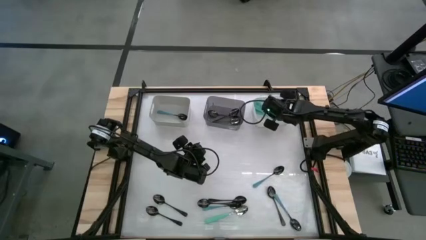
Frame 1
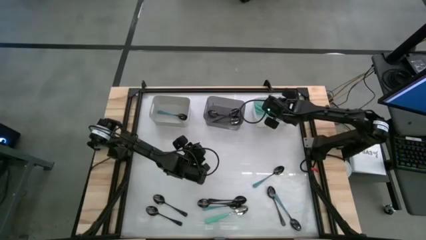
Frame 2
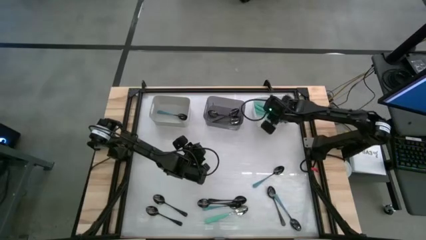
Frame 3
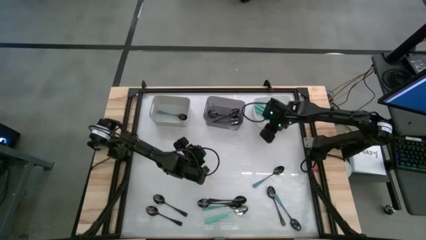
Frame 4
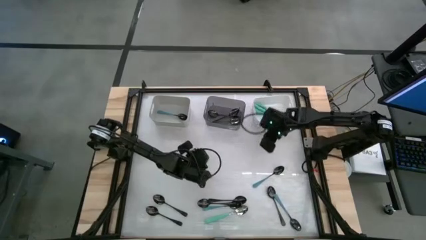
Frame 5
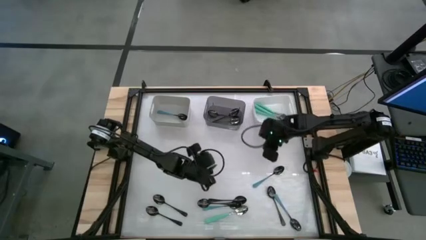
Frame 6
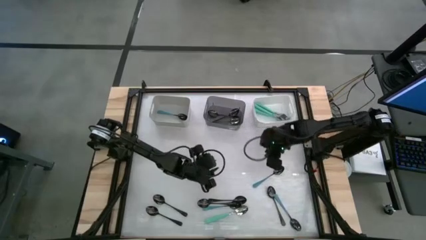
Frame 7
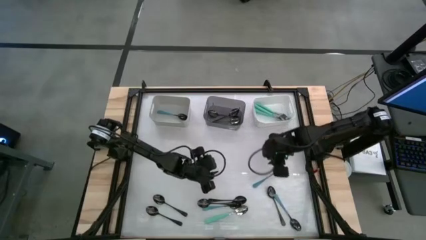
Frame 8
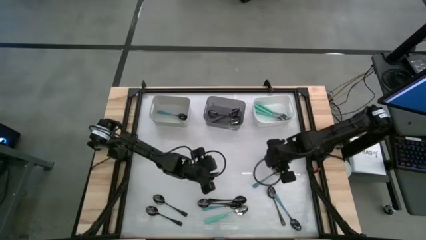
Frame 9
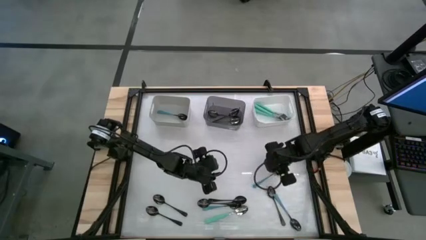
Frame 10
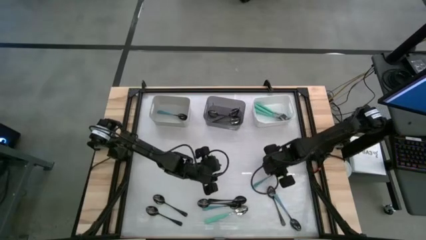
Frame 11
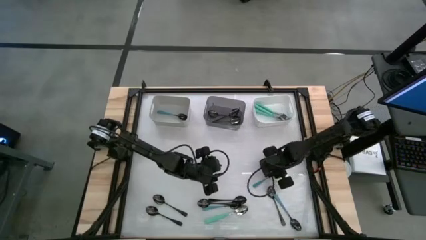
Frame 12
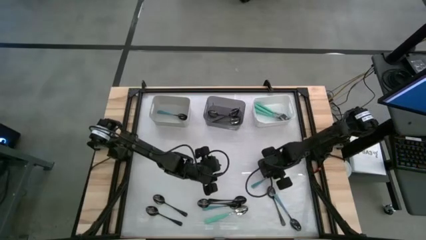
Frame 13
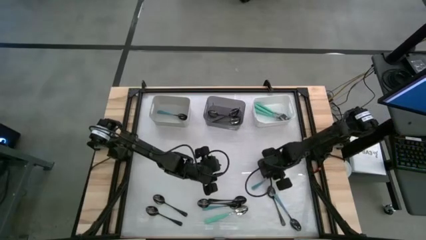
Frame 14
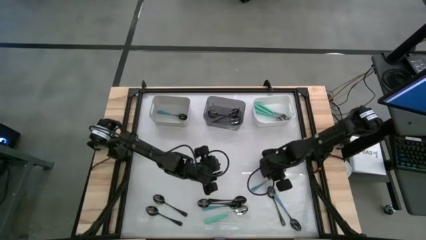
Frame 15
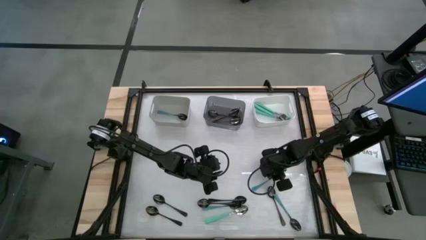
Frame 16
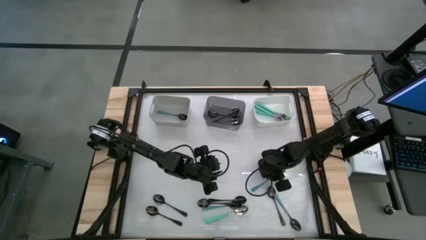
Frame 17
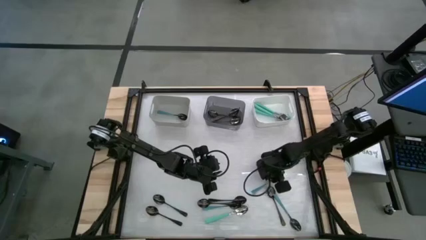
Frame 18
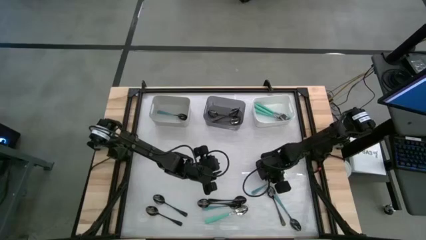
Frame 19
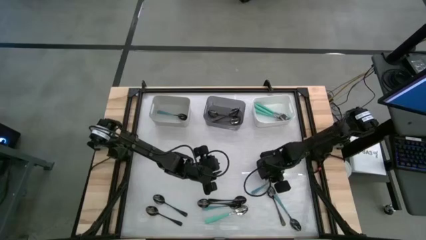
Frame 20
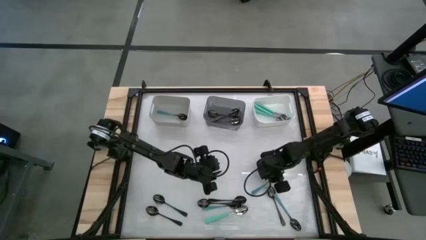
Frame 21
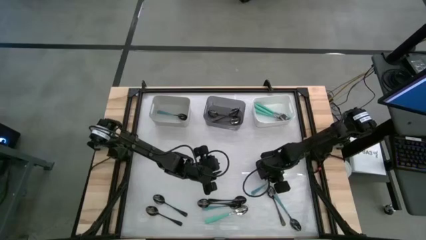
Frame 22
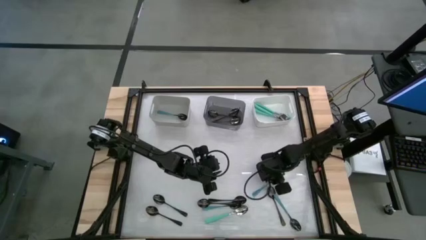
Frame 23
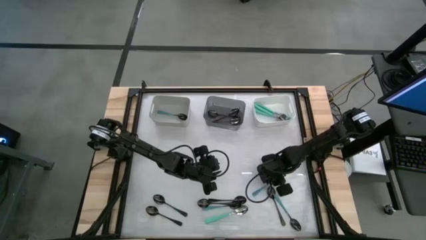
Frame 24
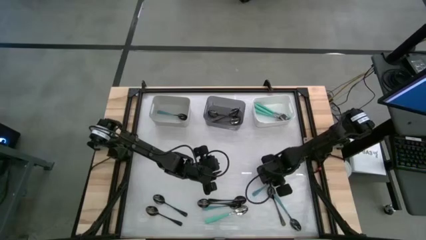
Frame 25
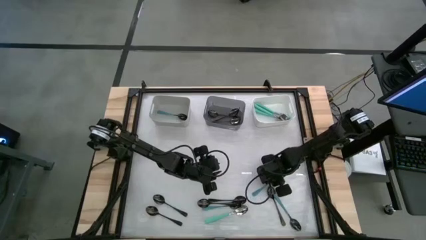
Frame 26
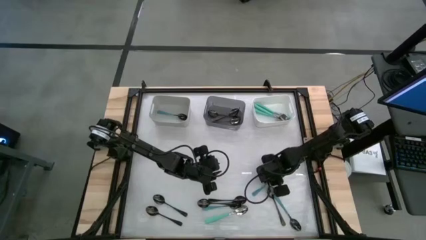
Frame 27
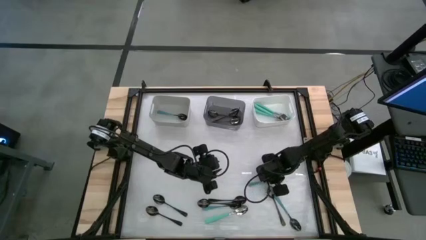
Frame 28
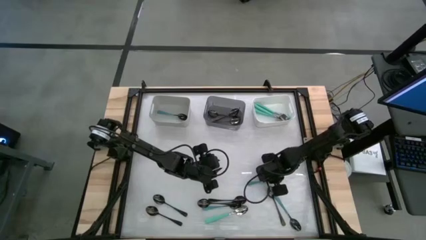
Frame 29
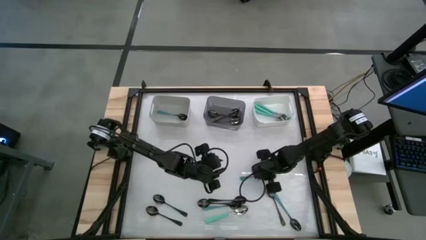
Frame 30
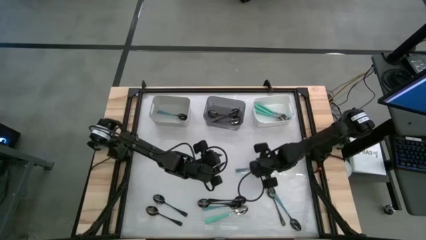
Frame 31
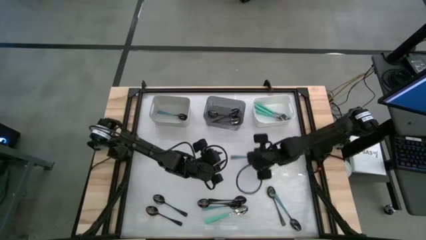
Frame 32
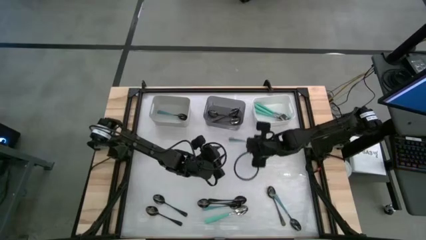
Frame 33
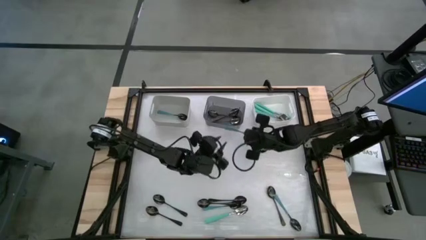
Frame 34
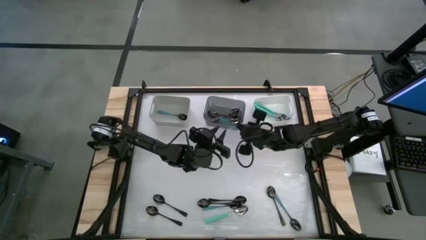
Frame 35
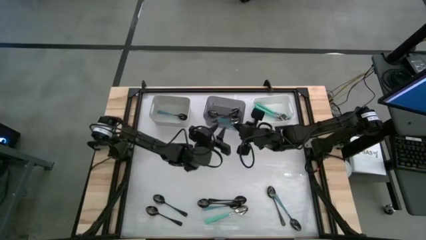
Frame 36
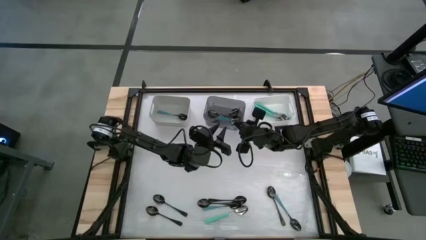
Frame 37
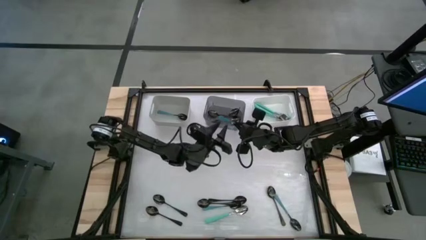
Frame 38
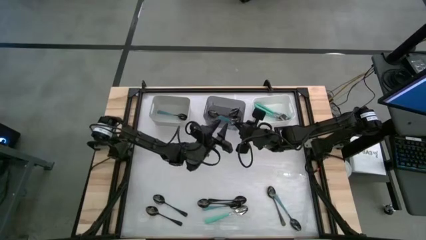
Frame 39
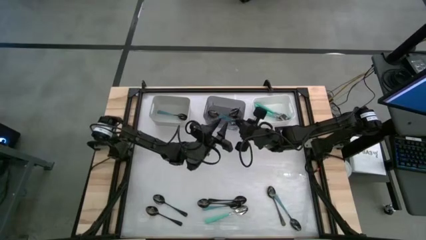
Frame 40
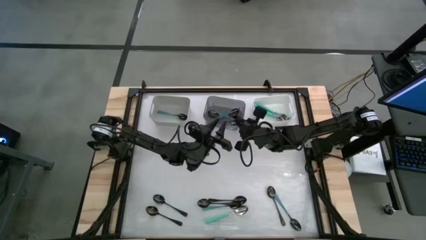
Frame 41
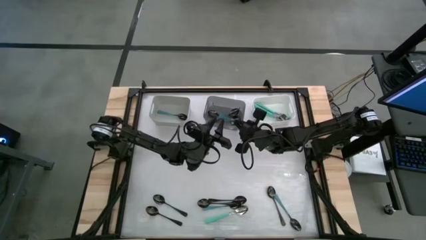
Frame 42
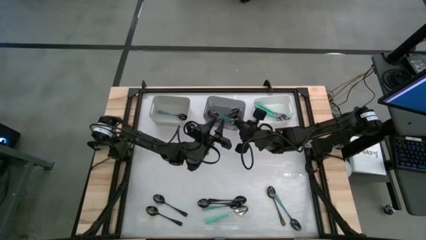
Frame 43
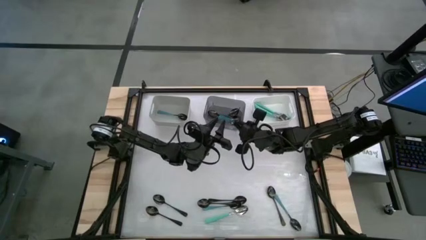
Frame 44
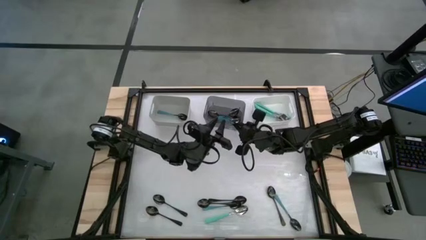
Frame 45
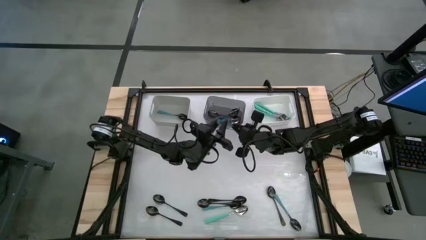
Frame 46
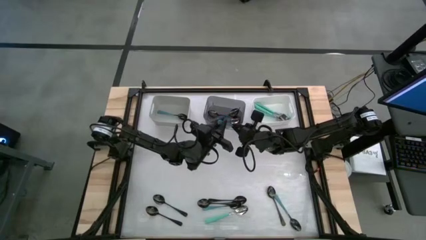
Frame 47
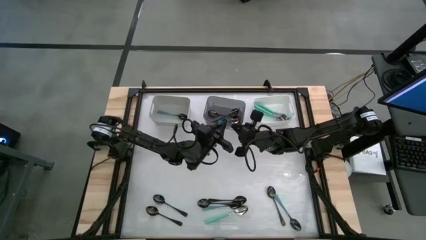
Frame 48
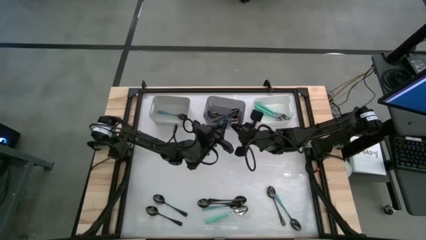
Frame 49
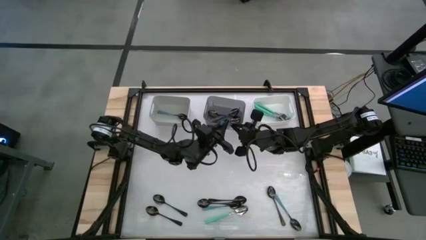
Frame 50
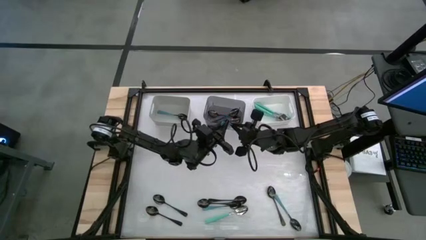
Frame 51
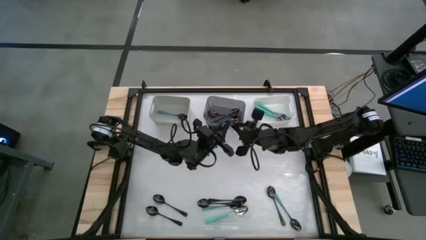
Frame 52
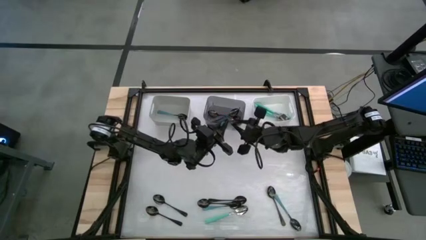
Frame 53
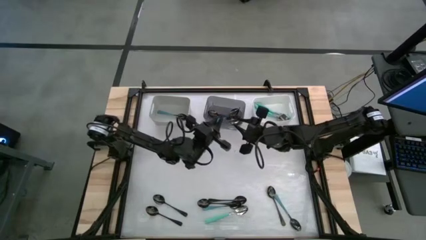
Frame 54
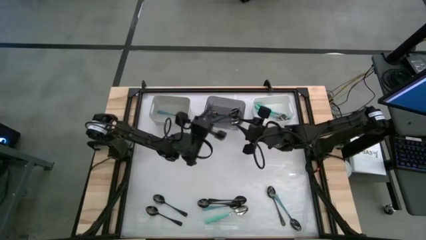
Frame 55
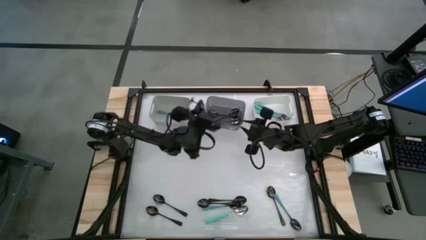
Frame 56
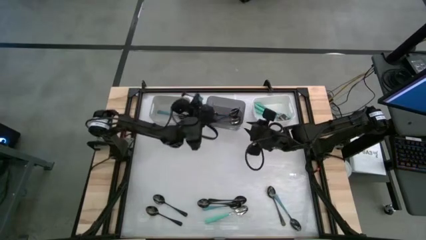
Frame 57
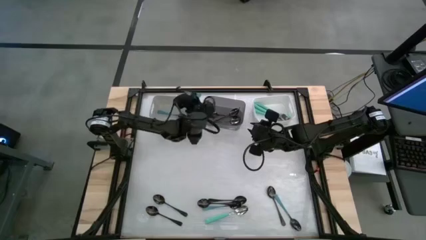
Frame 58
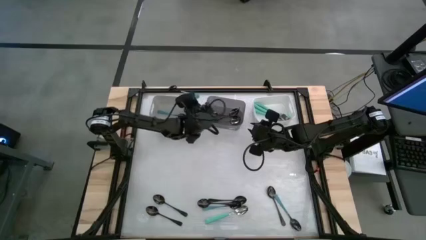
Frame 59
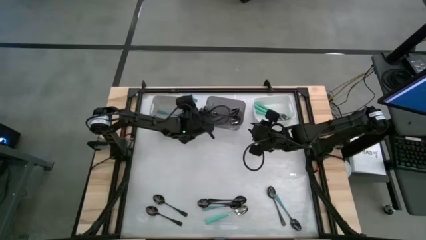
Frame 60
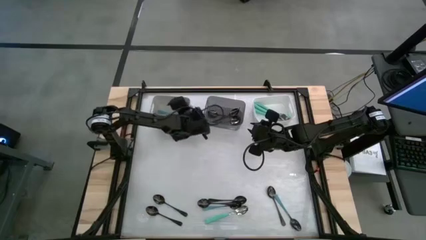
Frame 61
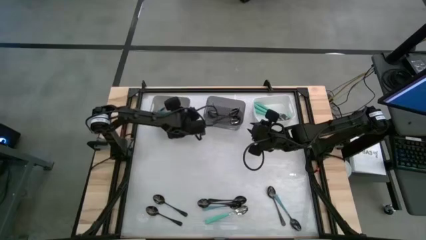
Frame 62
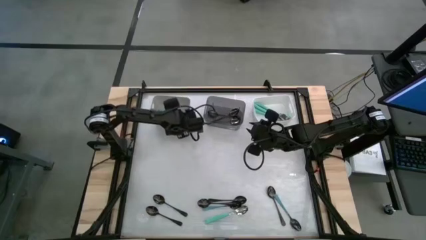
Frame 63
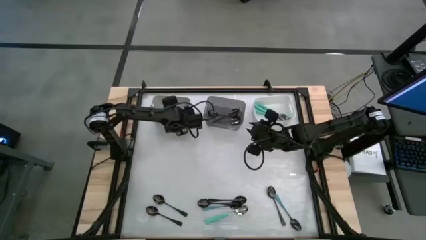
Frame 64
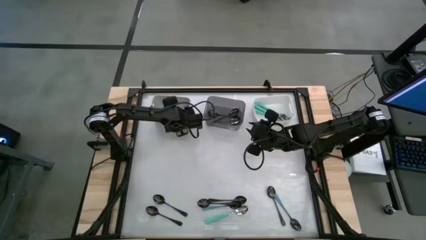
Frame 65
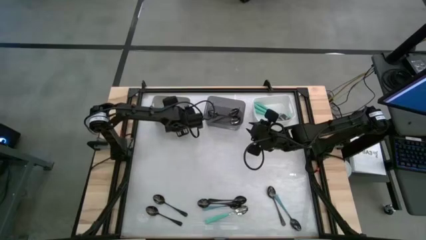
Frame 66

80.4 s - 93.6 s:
Task: Sort silverware by color (type)
Put the blue spoon into the gray bin
